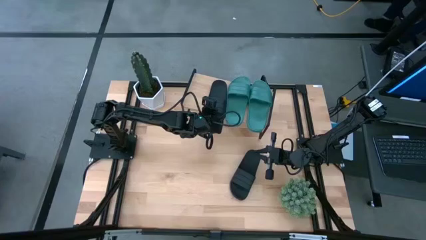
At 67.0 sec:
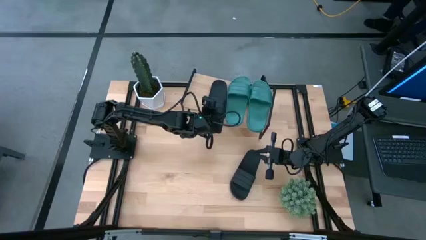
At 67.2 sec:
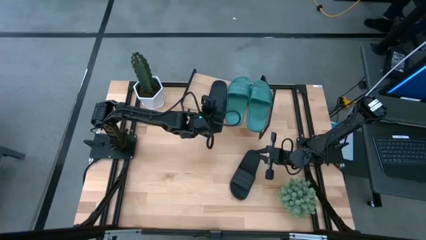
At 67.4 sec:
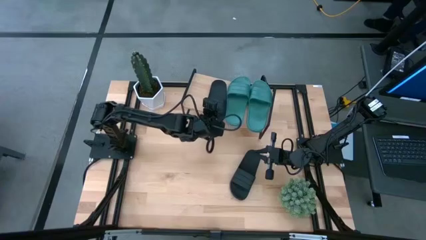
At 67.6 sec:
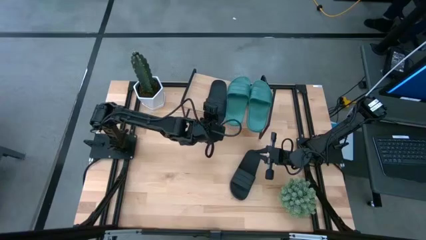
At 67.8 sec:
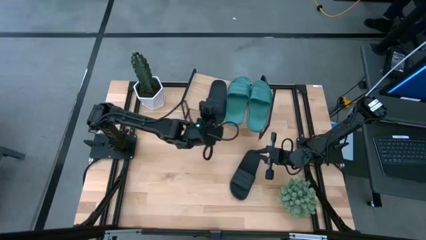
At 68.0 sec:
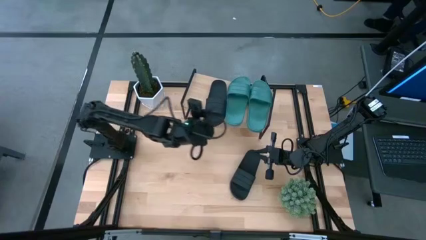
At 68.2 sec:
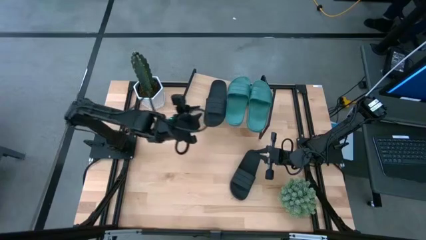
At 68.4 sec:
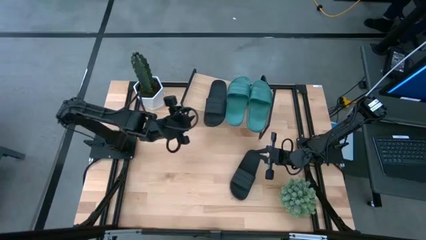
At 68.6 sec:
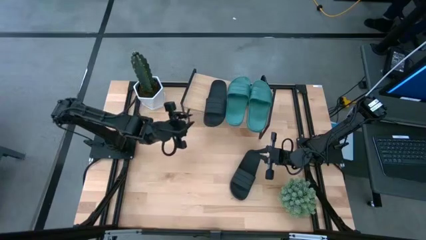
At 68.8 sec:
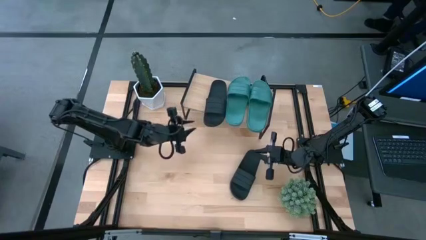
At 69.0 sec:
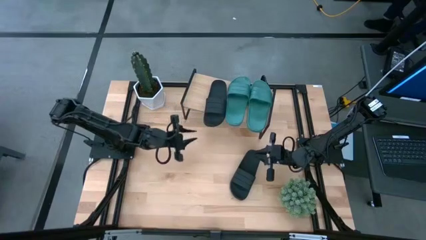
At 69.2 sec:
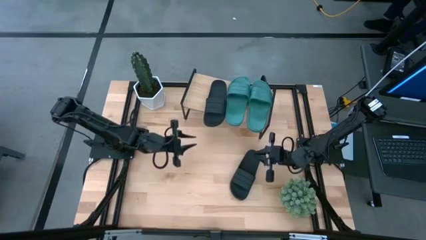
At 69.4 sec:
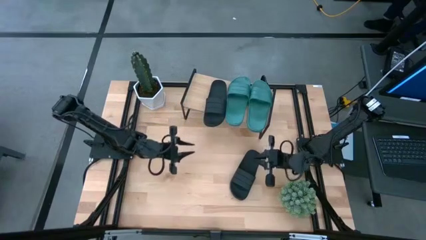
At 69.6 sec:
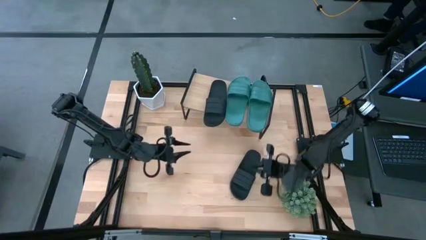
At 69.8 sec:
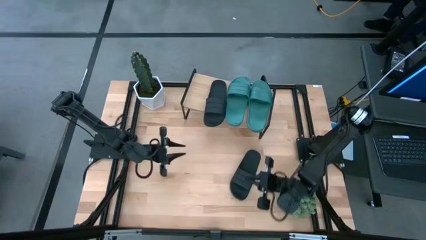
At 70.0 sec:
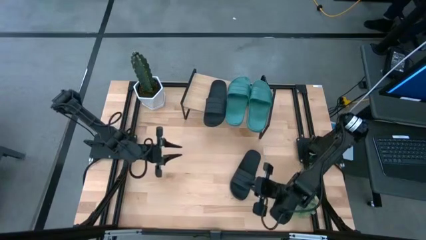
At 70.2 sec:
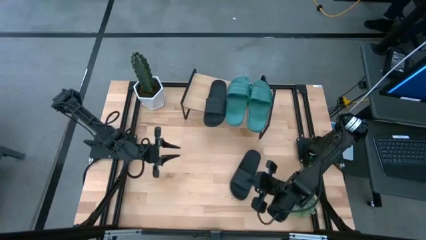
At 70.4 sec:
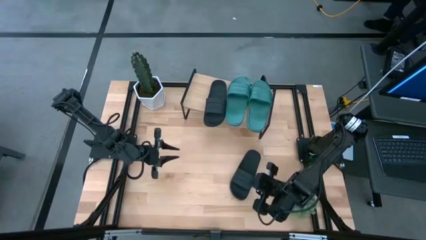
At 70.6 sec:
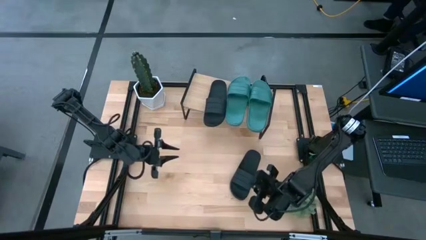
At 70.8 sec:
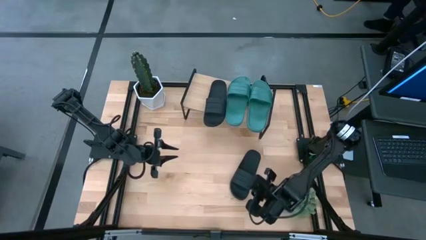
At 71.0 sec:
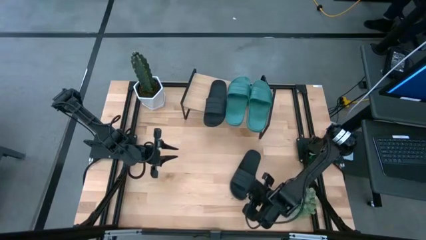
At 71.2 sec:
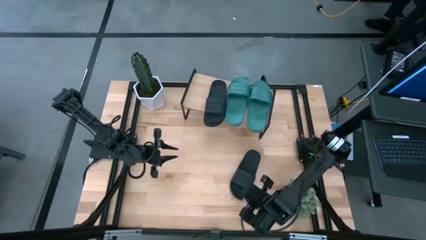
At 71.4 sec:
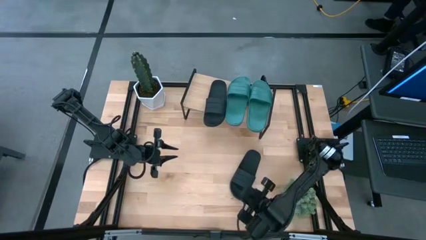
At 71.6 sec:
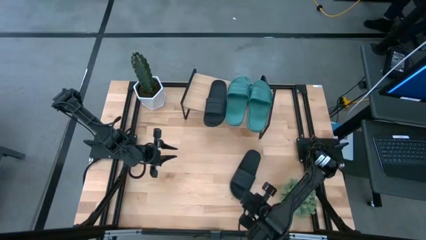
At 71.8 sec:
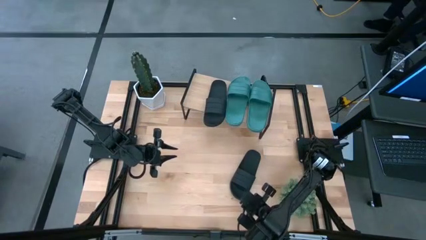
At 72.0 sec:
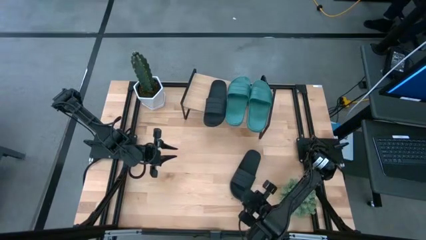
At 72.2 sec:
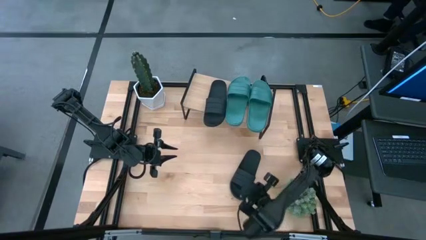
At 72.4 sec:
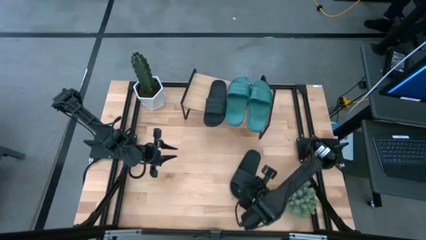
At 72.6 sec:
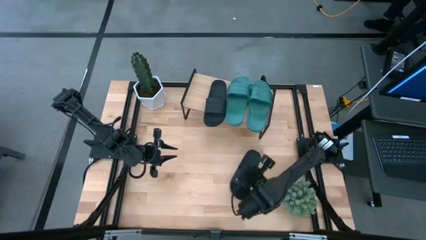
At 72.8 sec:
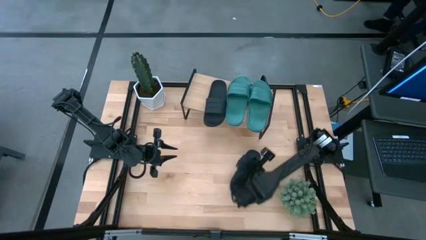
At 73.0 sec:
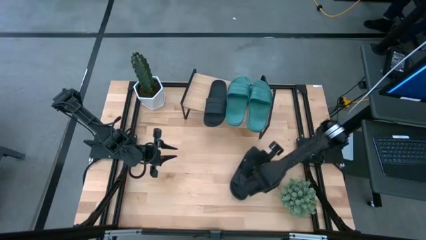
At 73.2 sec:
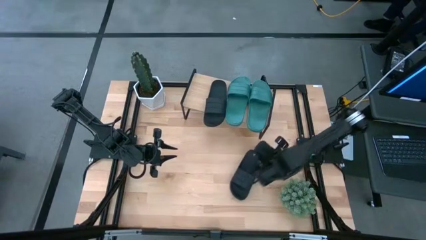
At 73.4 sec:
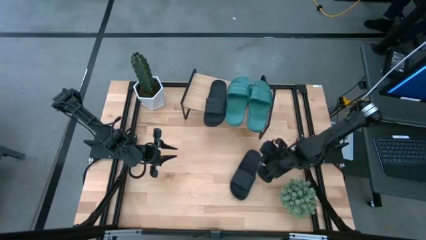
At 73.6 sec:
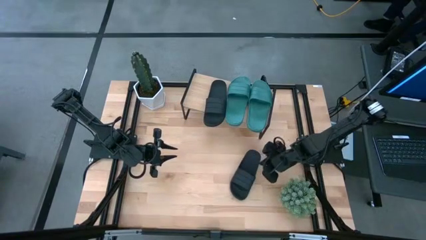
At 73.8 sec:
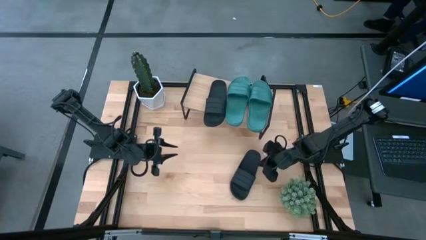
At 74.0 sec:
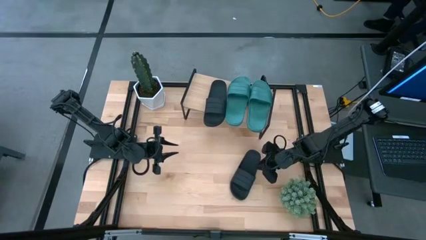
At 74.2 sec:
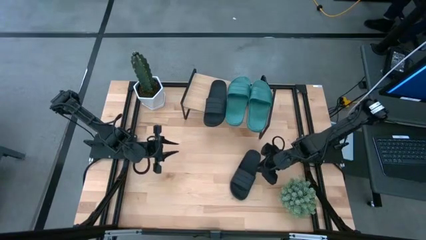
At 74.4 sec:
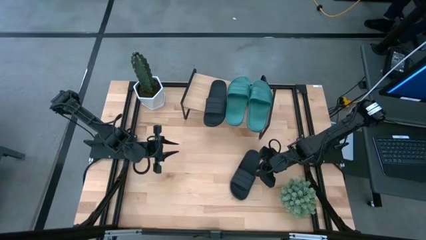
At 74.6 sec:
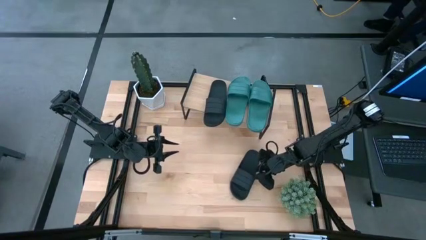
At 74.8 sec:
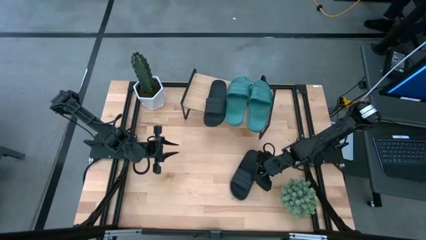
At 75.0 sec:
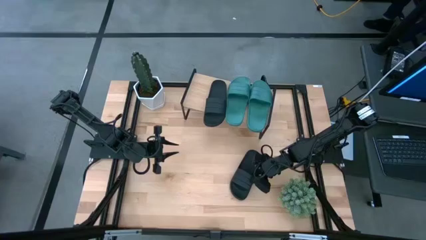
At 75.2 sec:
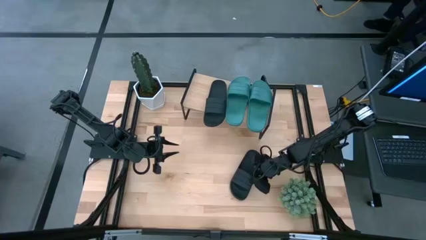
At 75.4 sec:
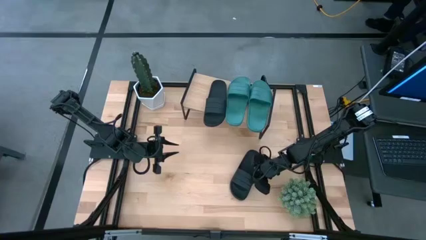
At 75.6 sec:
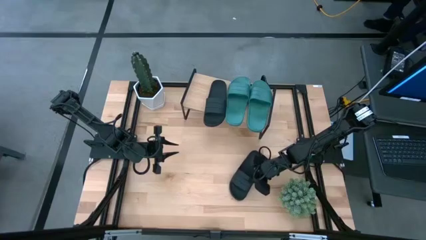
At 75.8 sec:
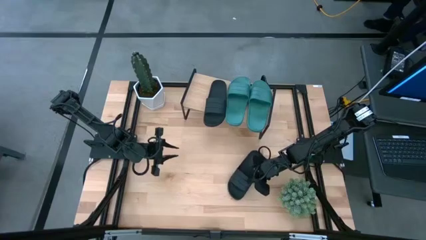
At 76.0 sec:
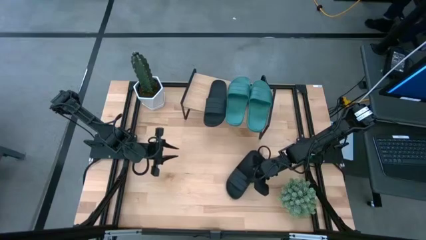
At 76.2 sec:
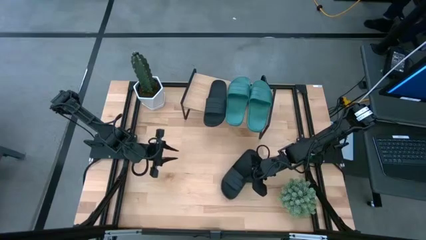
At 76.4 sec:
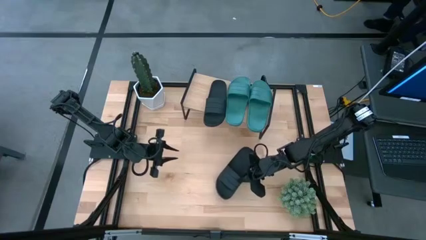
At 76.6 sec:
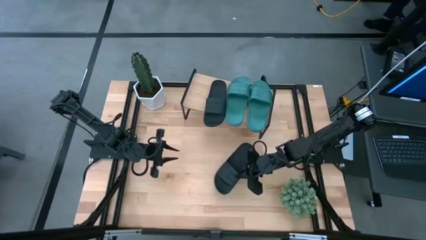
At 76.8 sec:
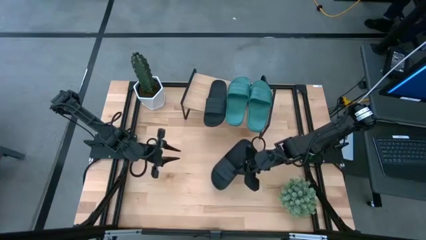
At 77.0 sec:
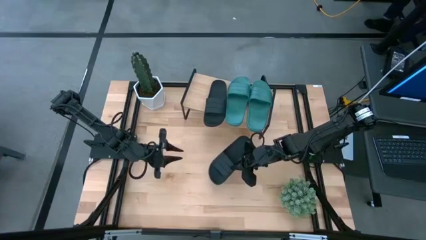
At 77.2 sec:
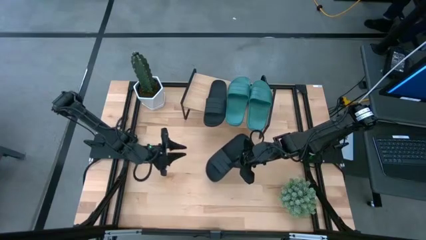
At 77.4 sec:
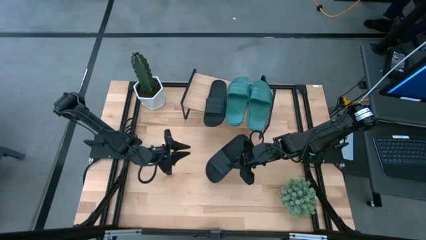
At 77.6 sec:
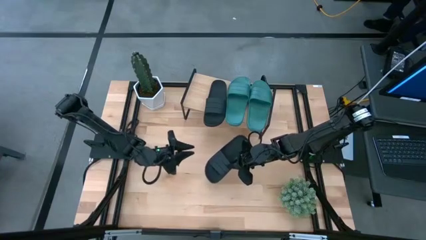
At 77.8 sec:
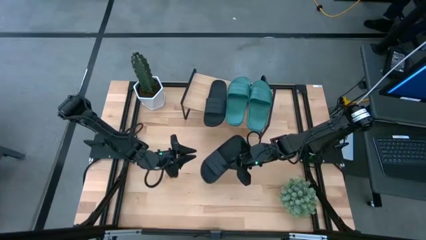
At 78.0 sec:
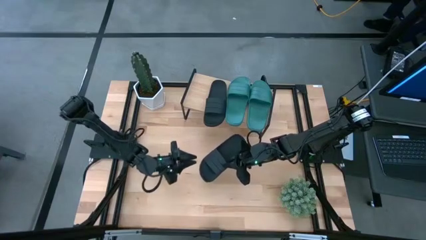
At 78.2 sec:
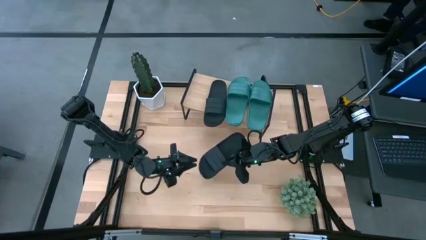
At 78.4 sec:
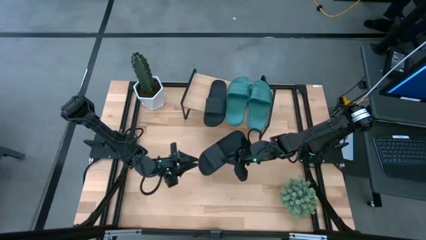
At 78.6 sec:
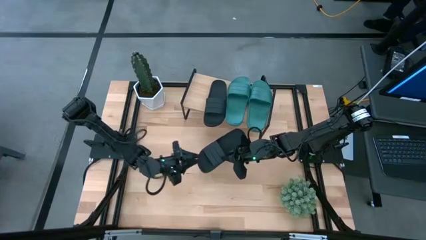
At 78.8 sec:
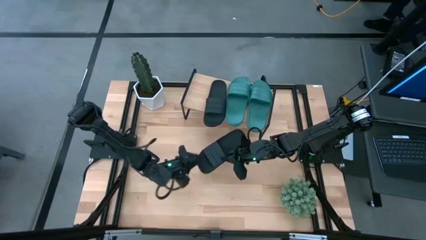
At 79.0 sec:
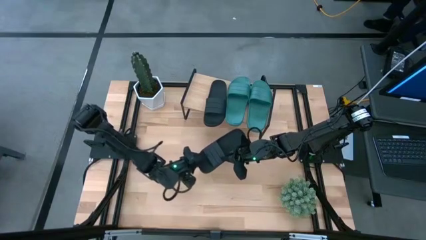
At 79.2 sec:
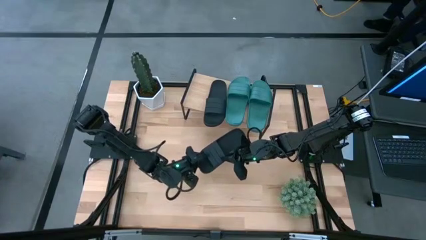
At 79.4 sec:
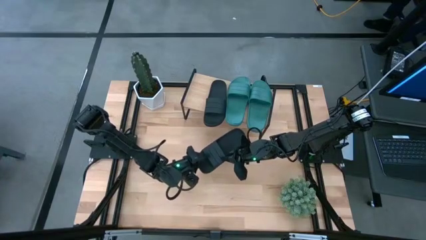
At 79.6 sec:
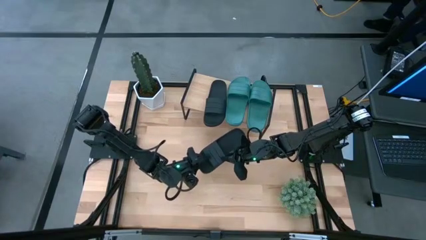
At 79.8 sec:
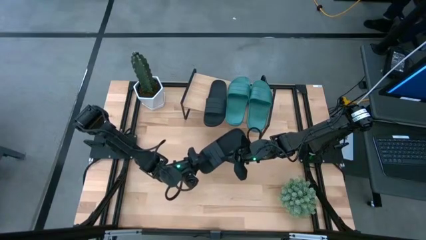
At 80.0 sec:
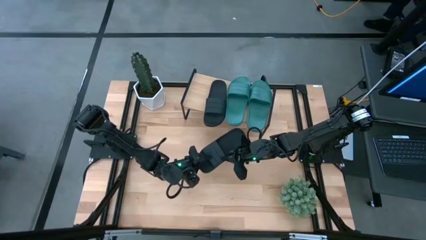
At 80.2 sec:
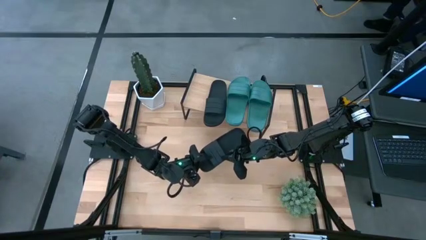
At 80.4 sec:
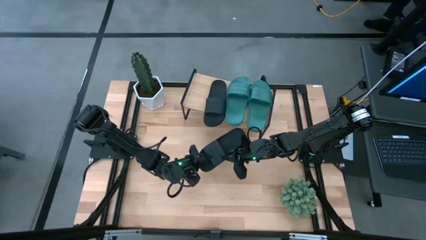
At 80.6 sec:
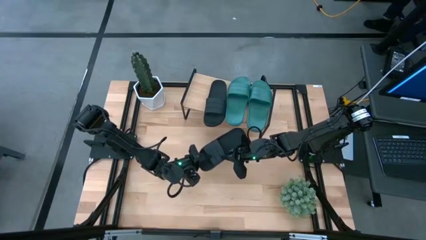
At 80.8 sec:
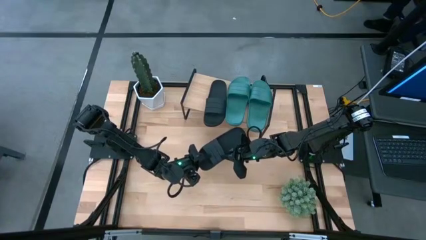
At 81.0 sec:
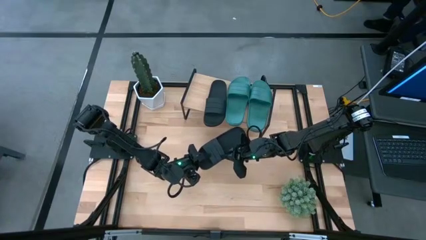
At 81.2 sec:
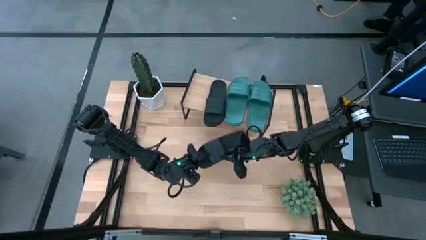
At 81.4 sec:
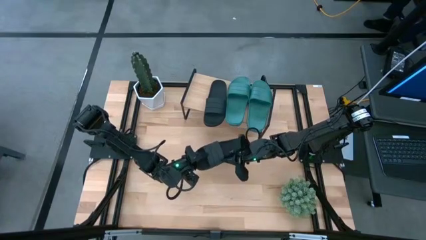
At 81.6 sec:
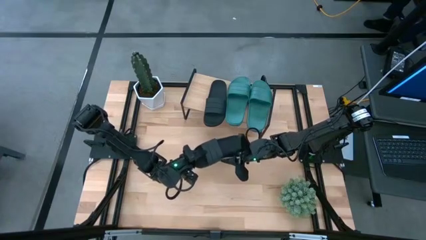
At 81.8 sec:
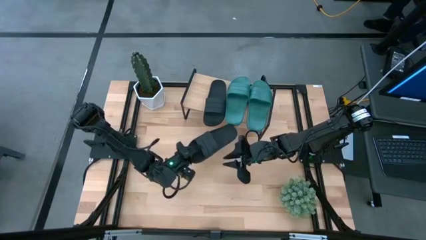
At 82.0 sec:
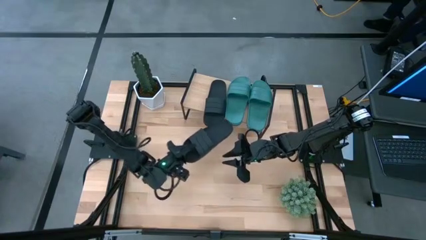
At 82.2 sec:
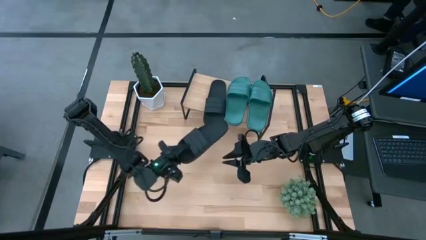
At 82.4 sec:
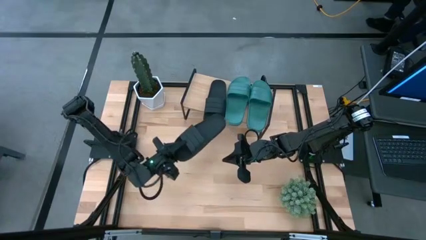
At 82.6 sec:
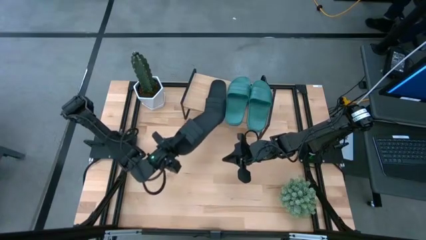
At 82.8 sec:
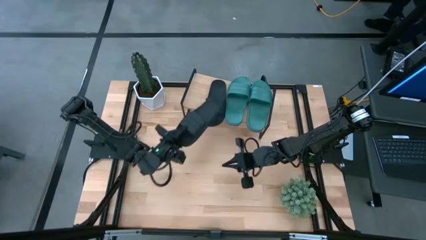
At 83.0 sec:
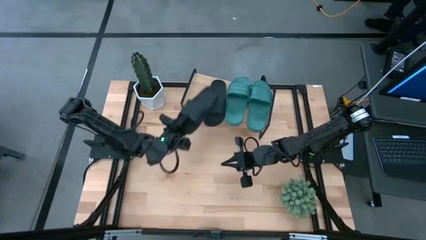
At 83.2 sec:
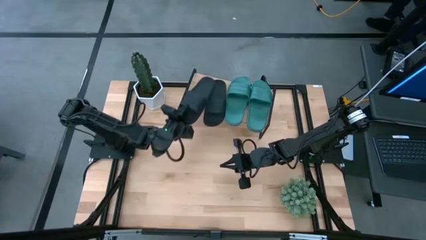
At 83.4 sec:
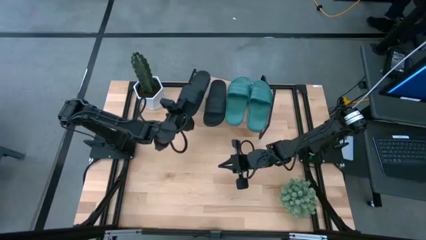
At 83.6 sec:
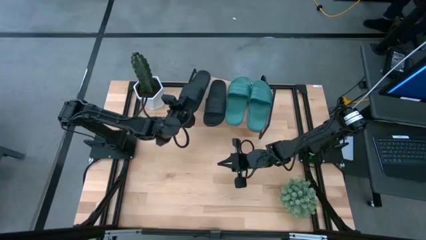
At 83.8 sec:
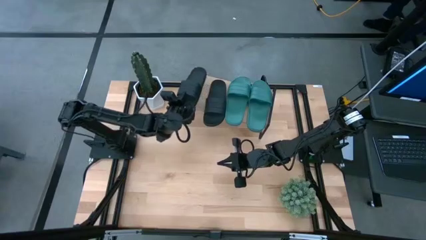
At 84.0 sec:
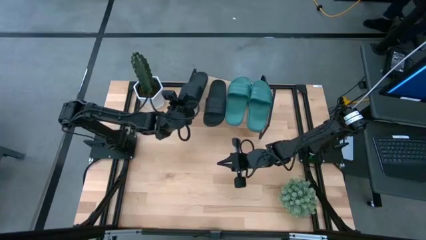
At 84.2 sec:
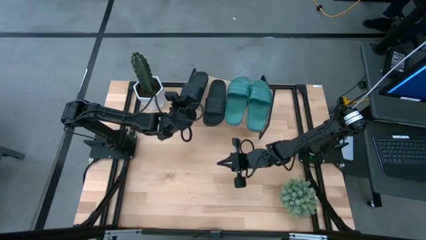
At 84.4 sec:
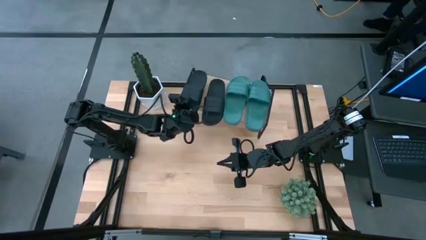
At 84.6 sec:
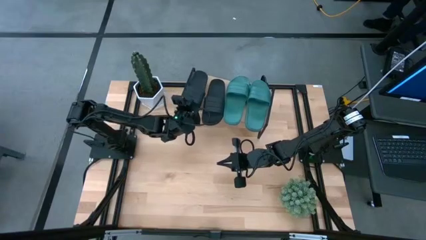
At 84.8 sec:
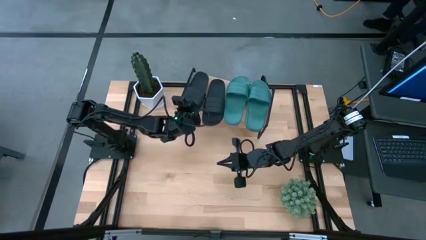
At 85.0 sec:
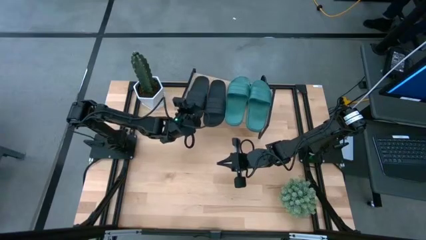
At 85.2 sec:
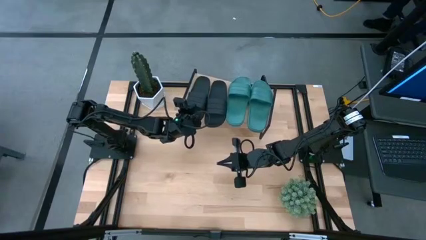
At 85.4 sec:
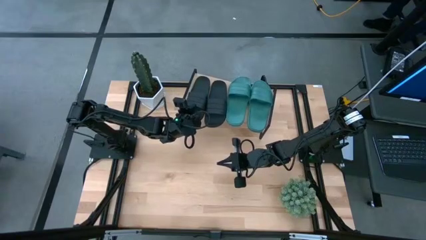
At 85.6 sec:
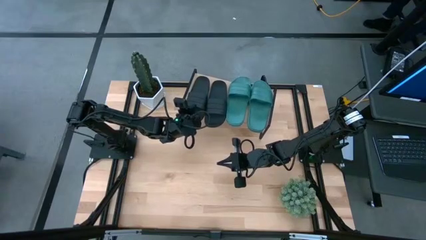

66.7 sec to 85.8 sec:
Task: Pick and place slides into the shelf
Put the black slide on the shelf
